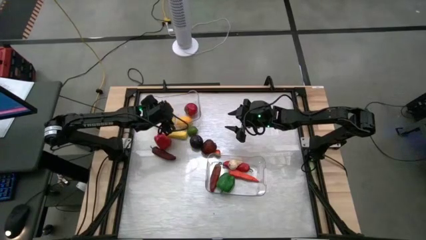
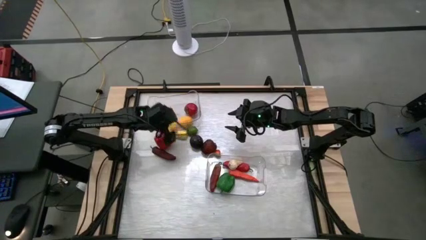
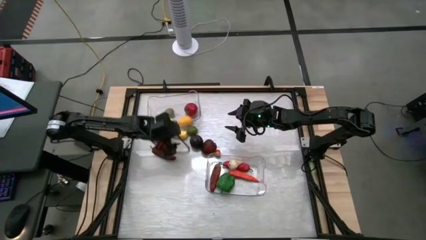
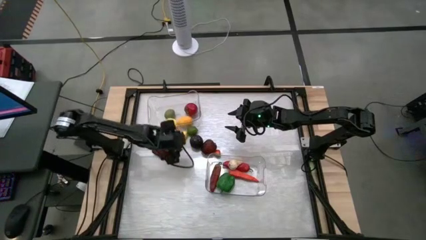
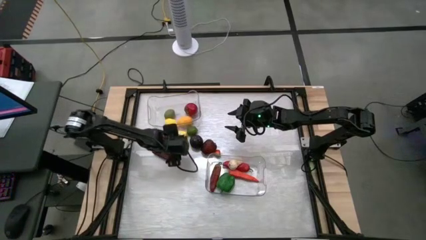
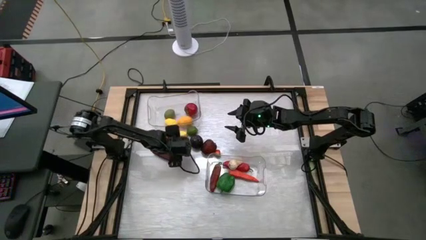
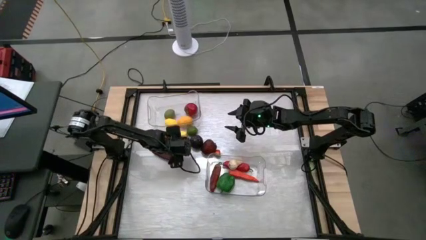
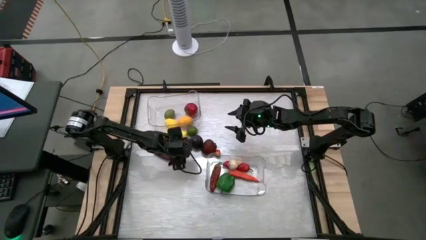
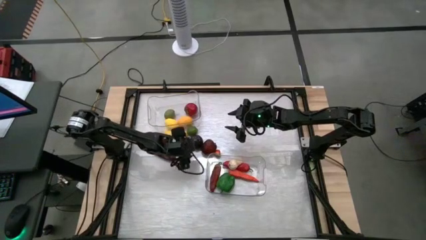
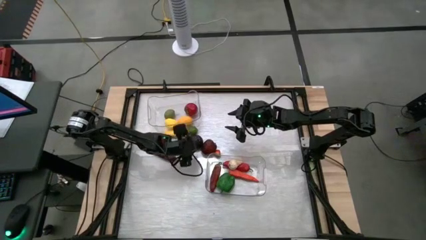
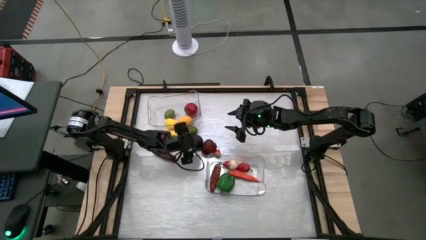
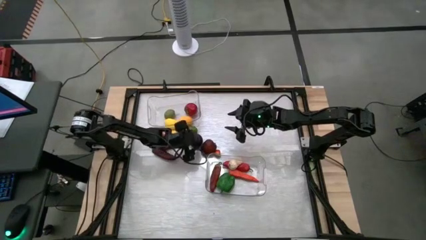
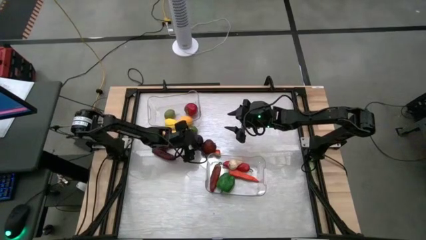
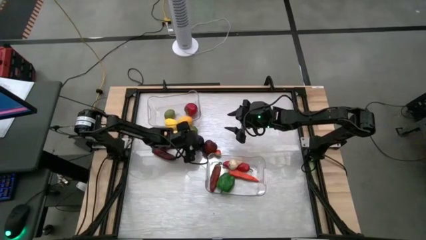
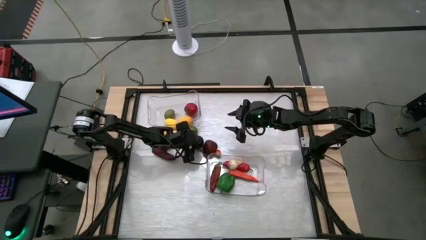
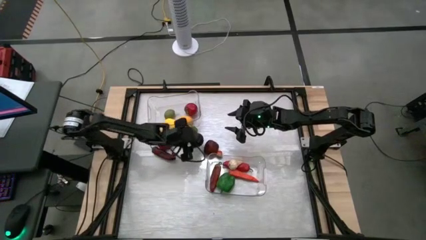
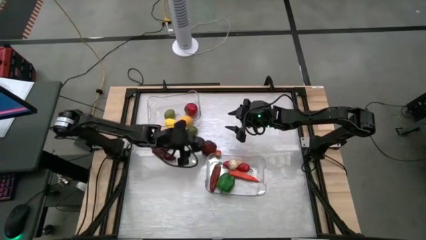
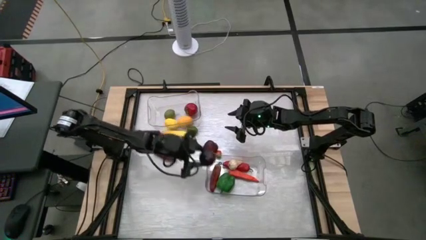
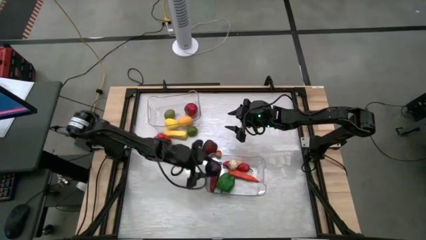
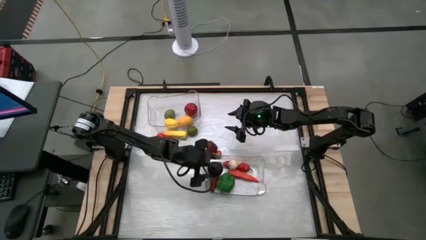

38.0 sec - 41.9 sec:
Task: Sort produce into baskets
Put the purple onion into the bottom transparent bin

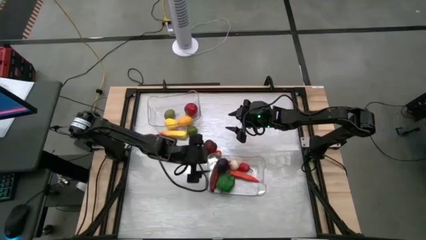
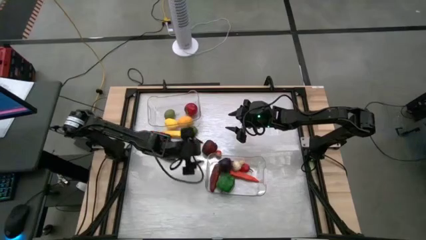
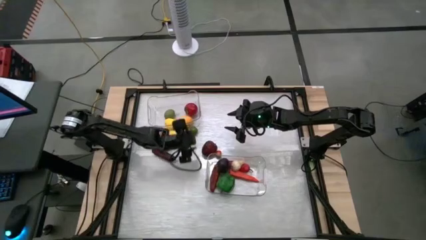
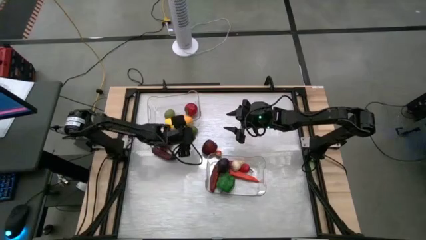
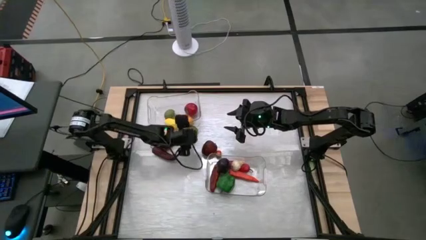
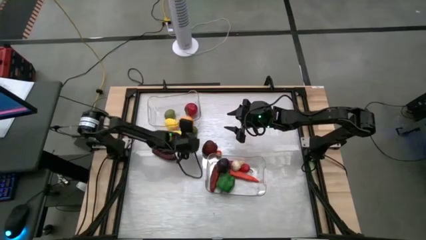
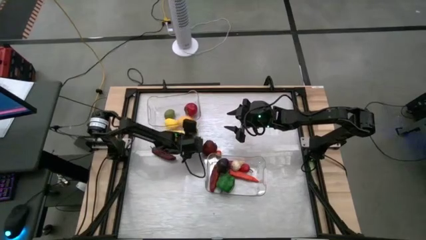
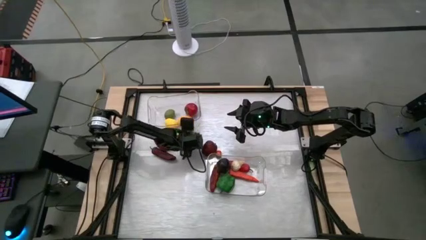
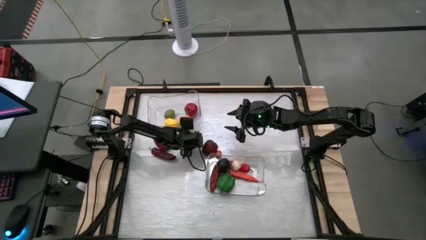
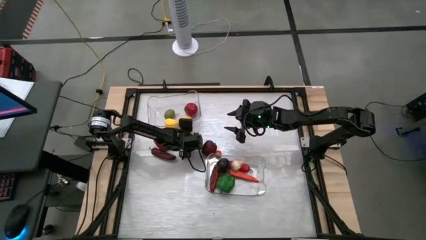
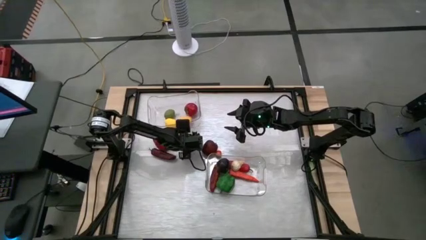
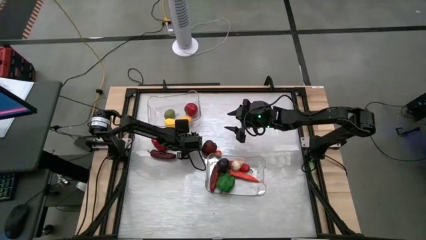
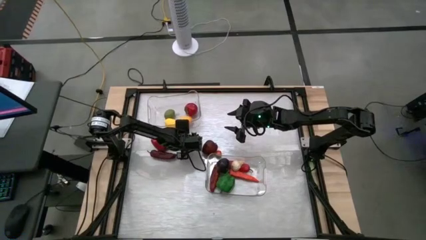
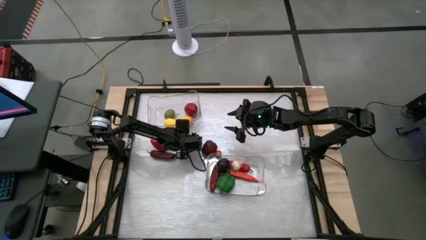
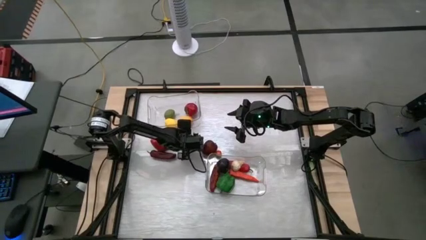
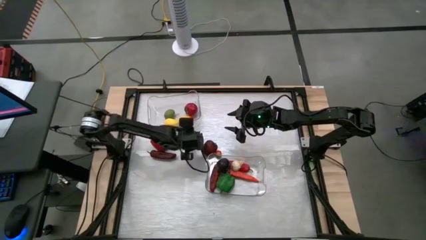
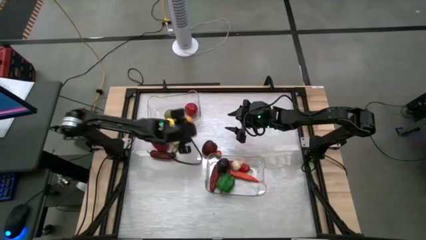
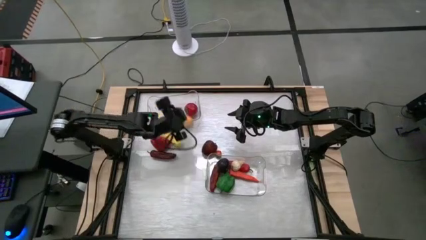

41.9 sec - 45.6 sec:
Put the green lime into the top transparent bin

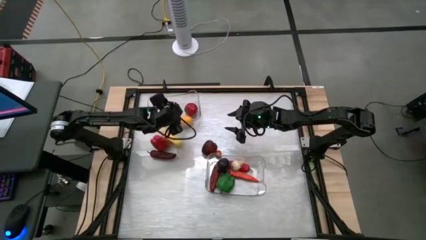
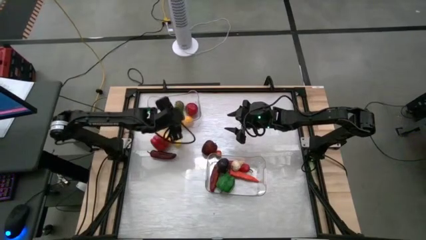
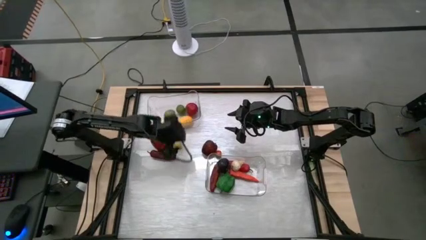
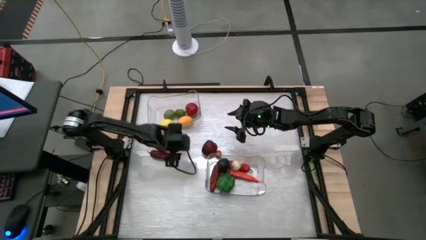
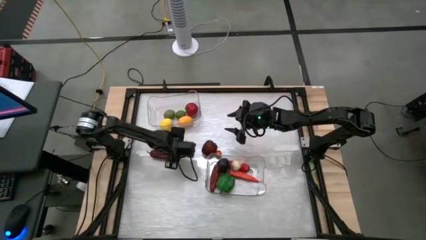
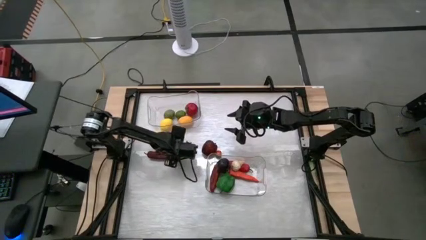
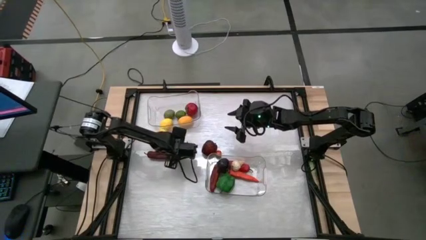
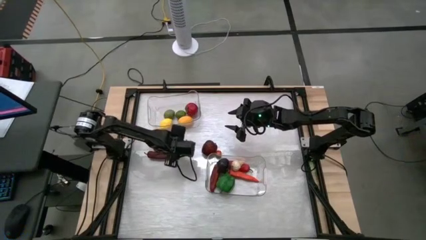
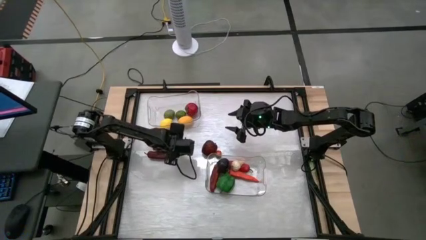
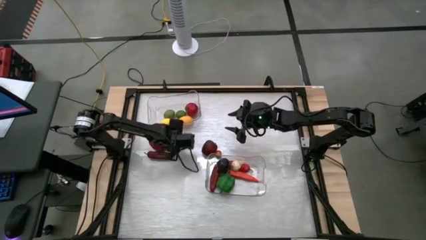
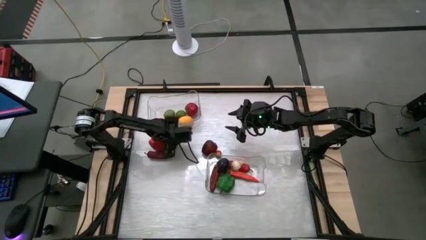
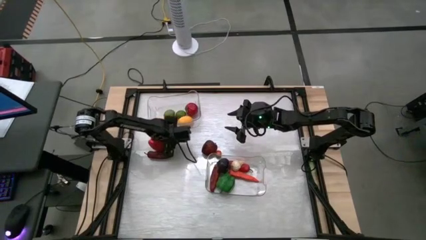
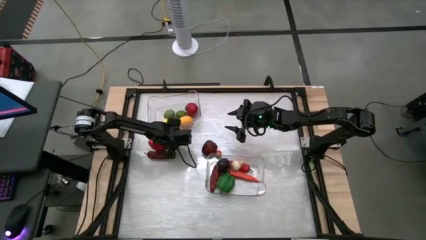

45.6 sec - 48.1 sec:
Put the yellow corn into the bottom transparent bin

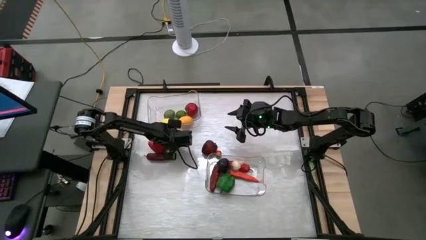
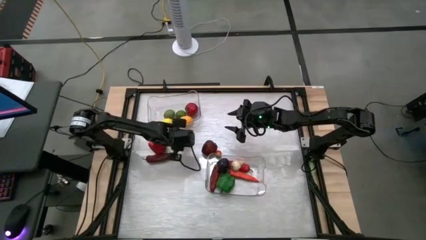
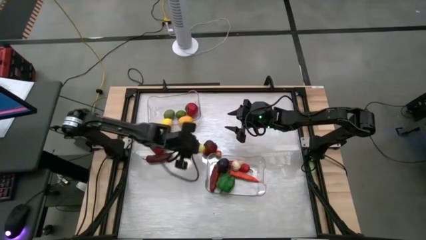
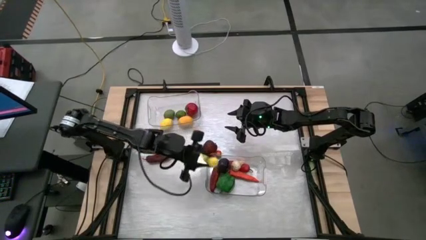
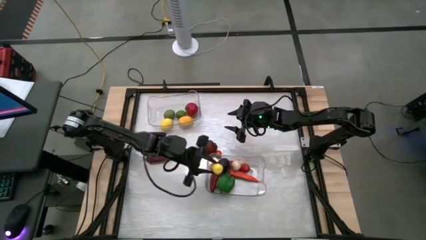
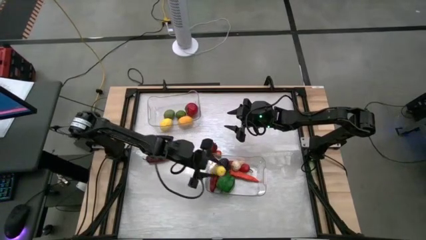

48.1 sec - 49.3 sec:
Put the yellow corn into the bottom transparent bin

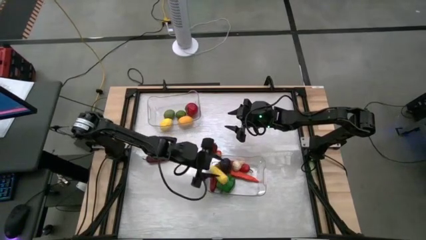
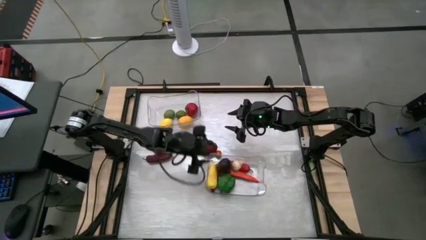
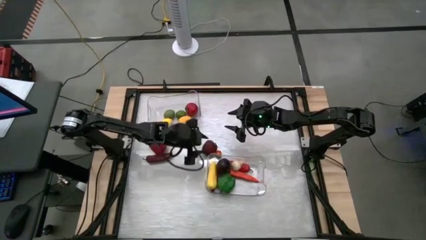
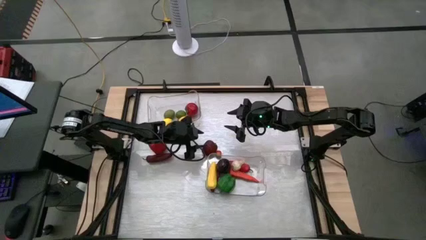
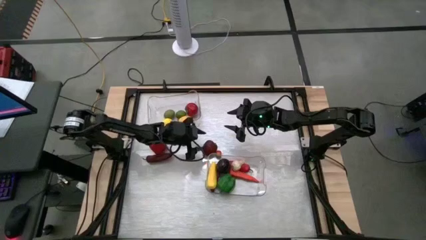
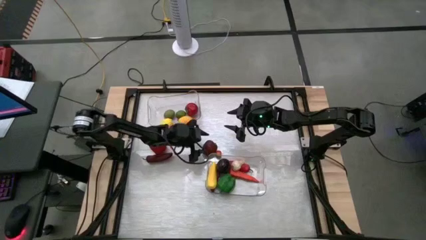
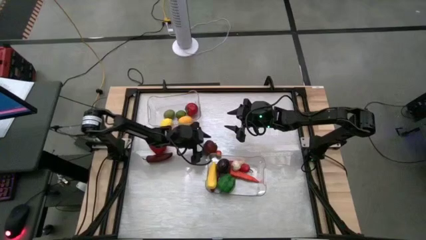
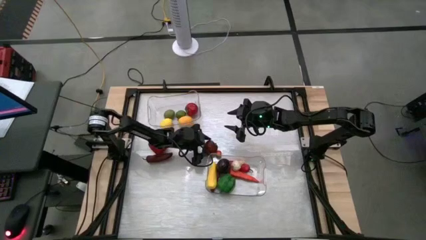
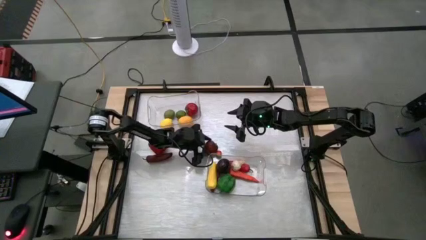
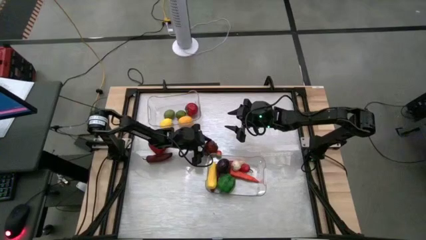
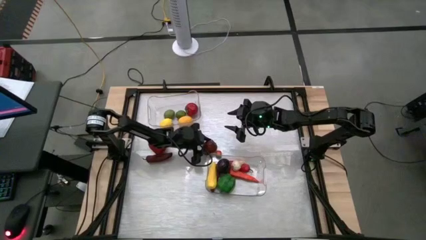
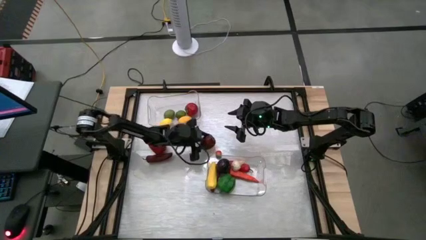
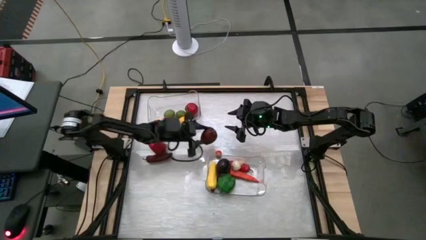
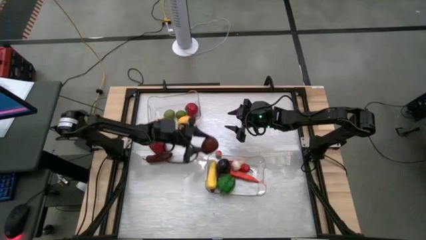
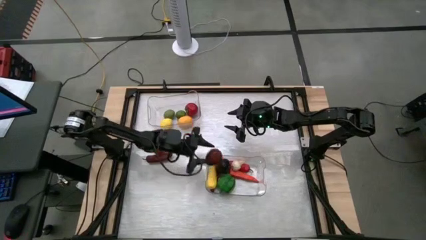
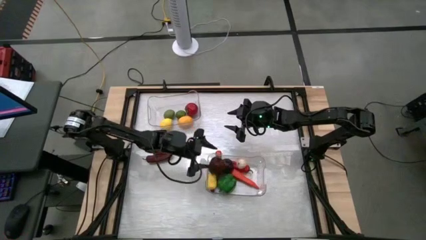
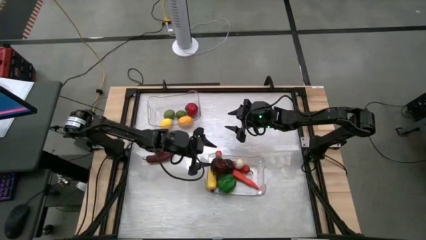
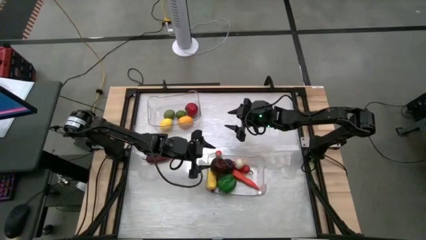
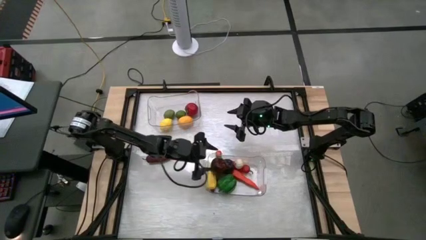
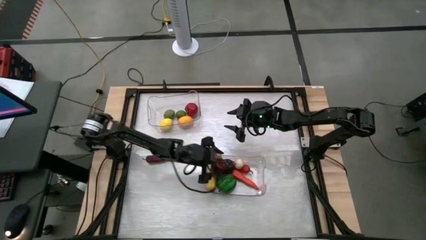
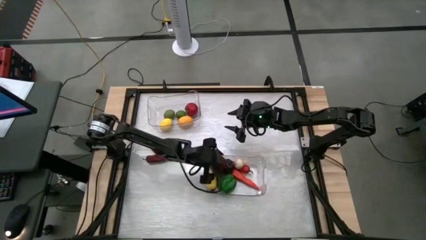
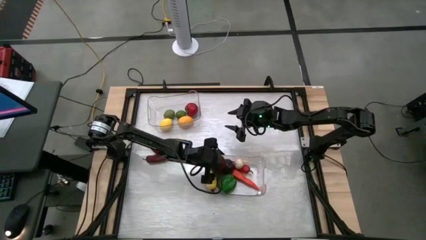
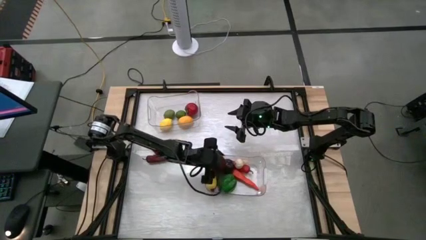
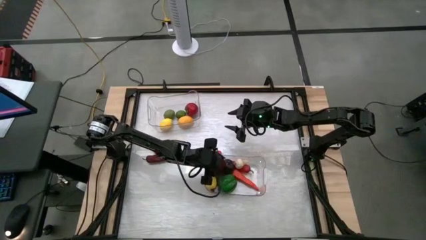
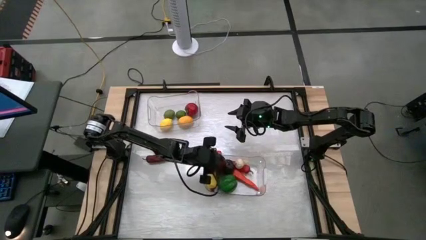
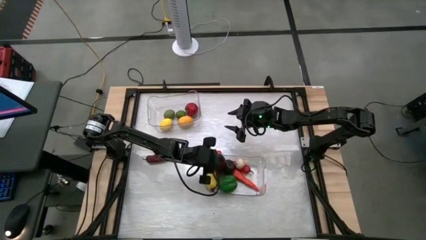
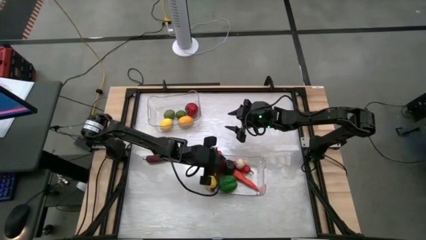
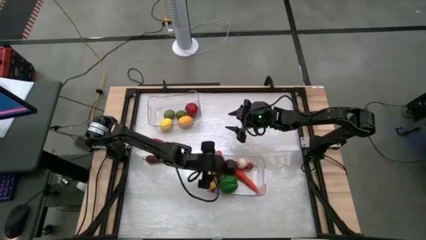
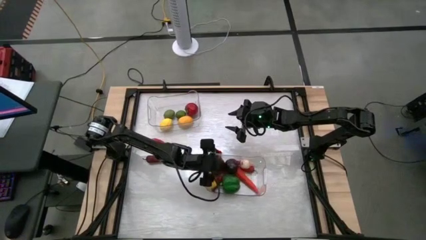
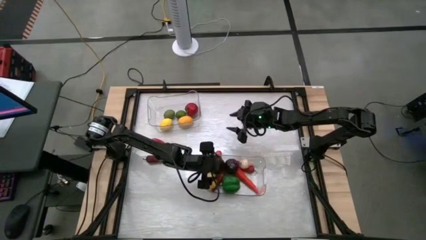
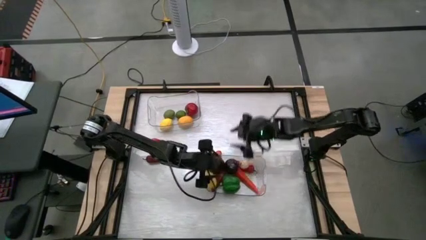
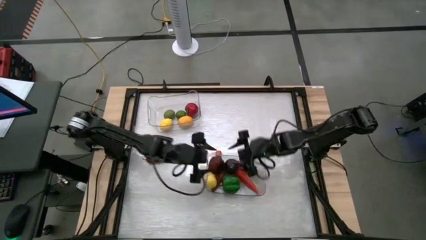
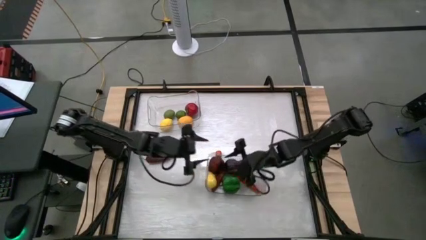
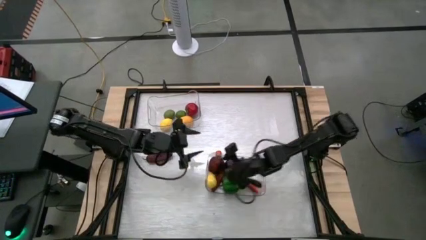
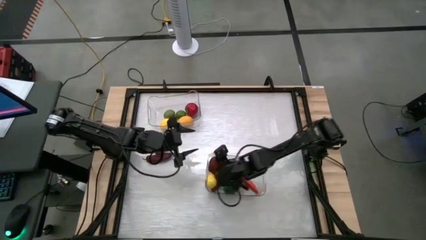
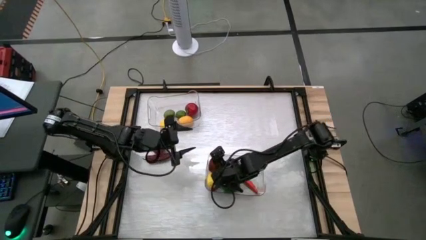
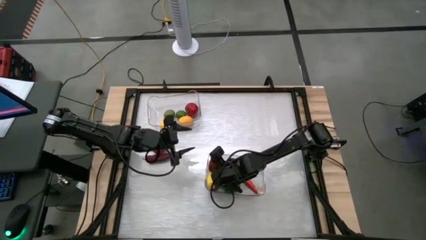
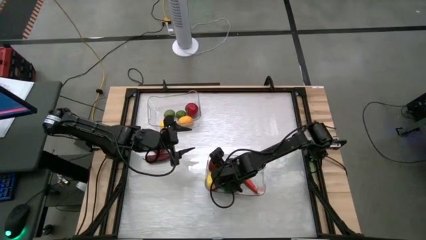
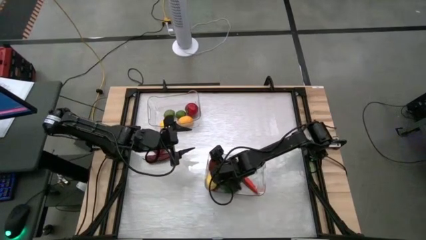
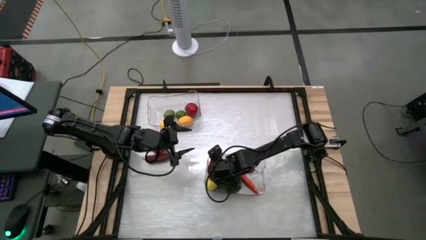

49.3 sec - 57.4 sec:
Put the red apple into the top transparent bin
